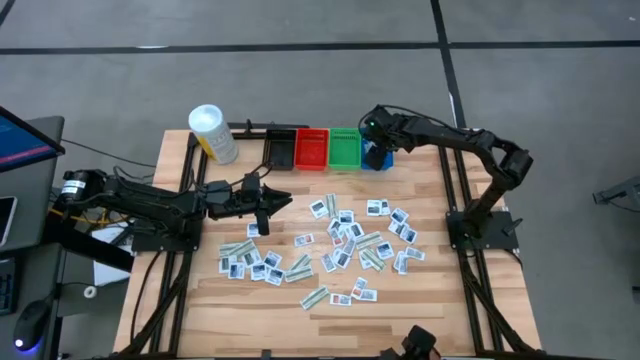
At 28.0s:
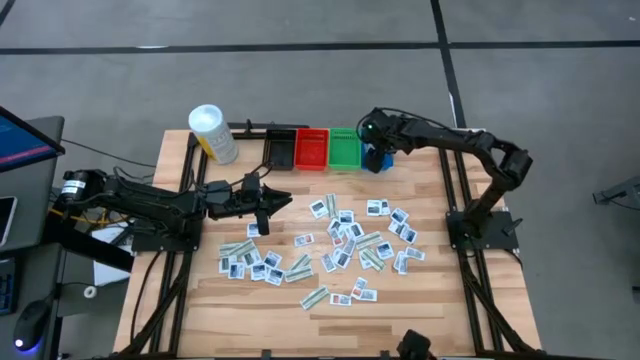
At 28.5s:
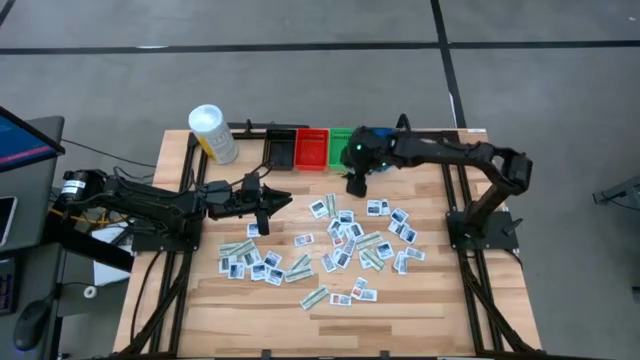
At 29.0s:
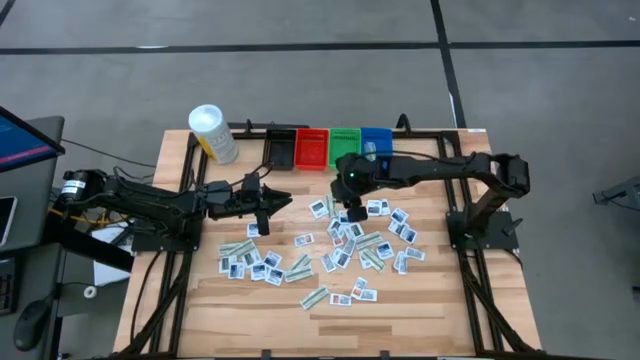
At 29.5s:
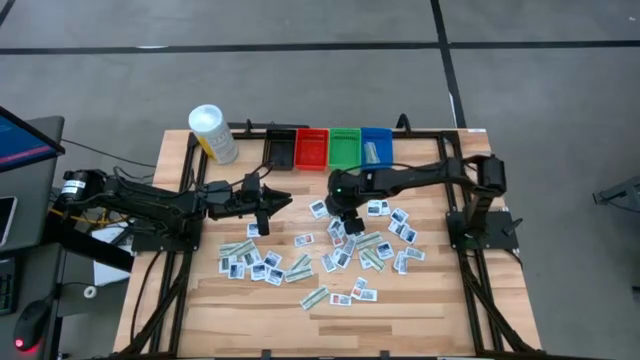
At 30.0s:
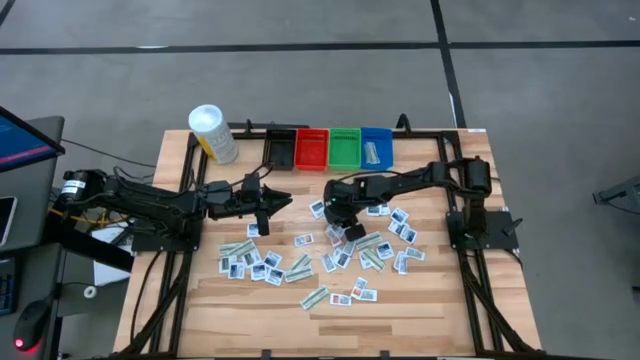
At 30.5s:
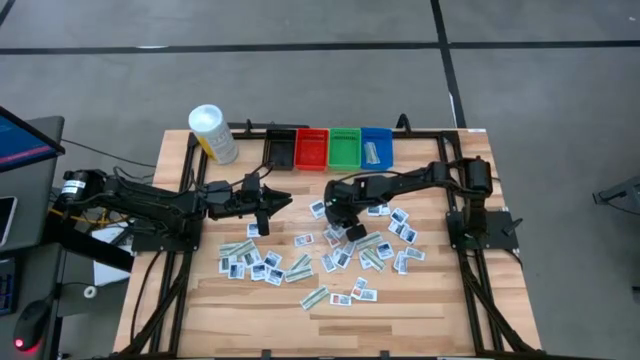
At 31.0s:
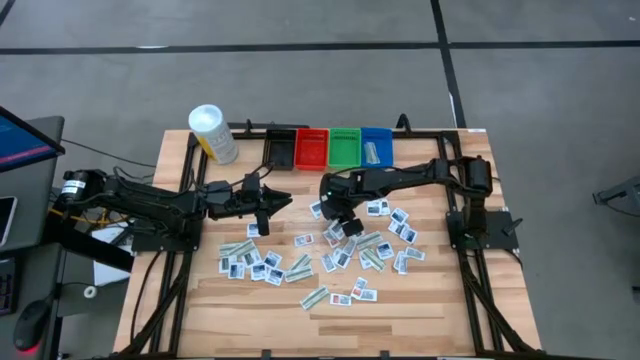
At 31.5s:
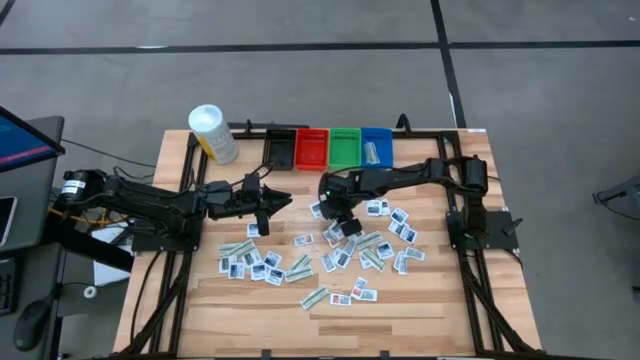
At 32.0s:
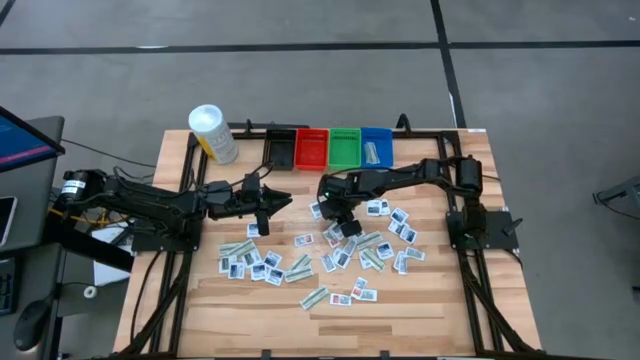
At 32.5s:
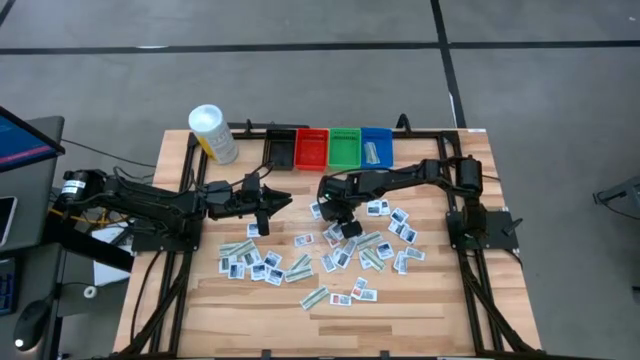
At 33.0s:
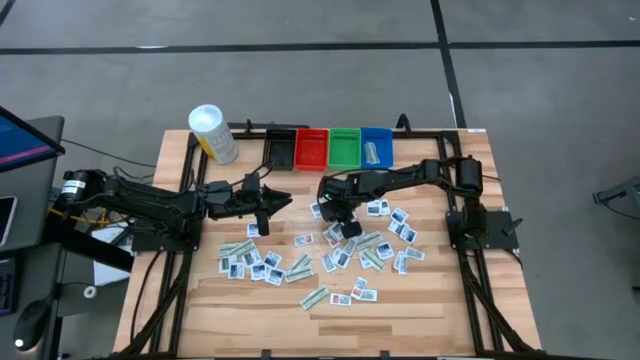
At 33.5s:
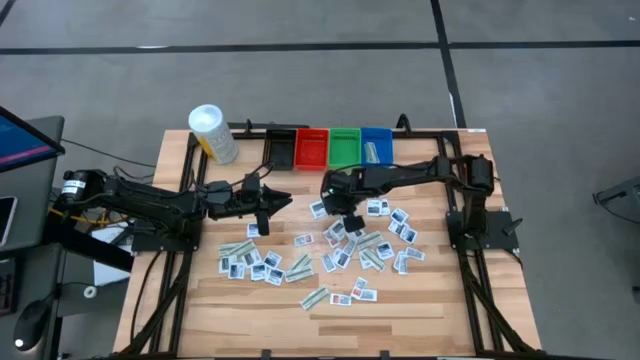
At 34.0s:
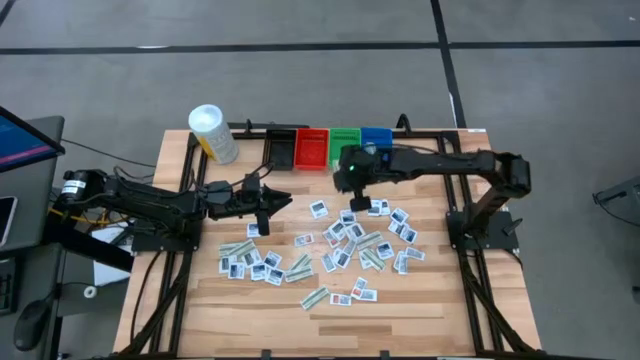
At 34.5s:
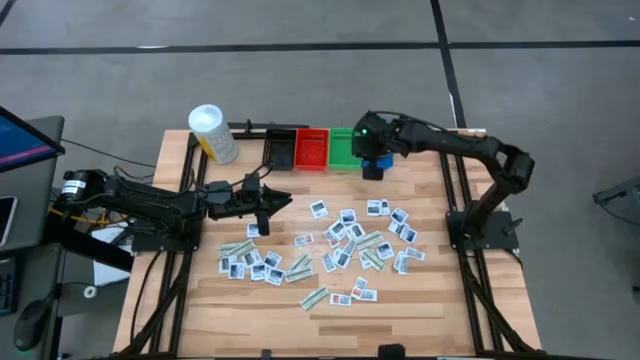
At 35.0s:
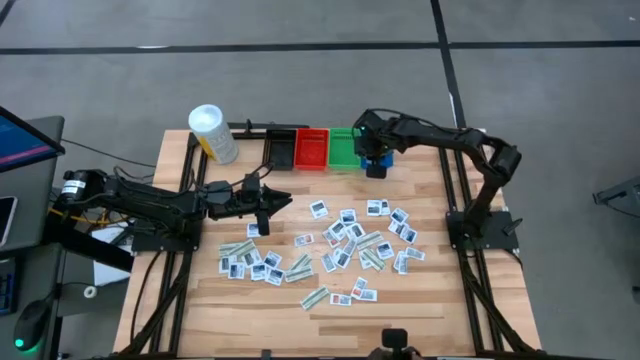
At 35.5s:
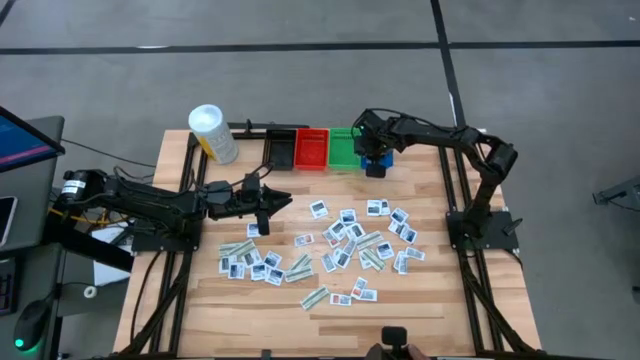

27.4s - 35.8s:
Task: Pick & Place First Aid Supplies
Put the bandage pack into the blue bin

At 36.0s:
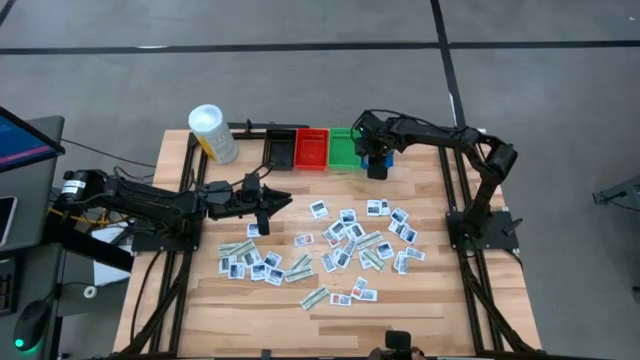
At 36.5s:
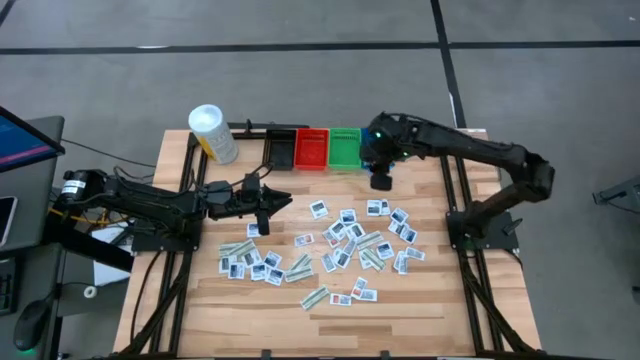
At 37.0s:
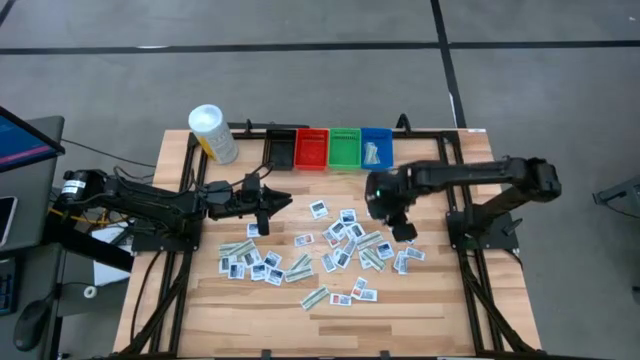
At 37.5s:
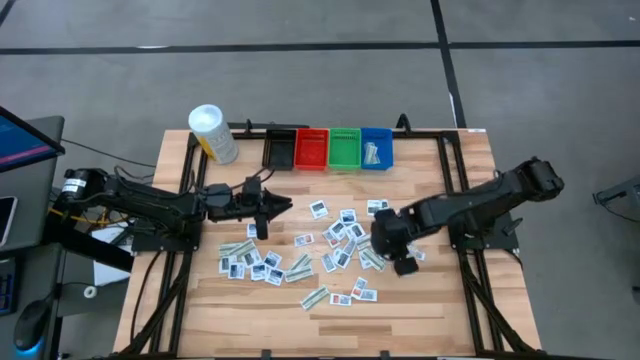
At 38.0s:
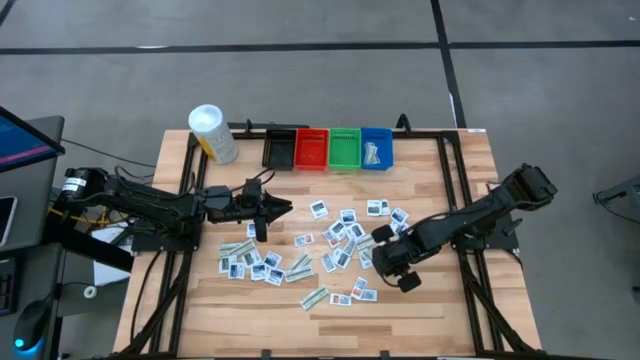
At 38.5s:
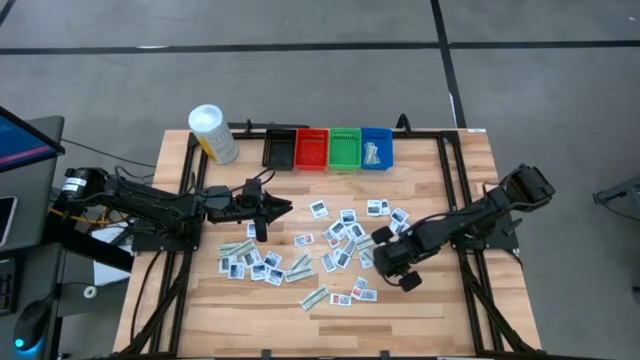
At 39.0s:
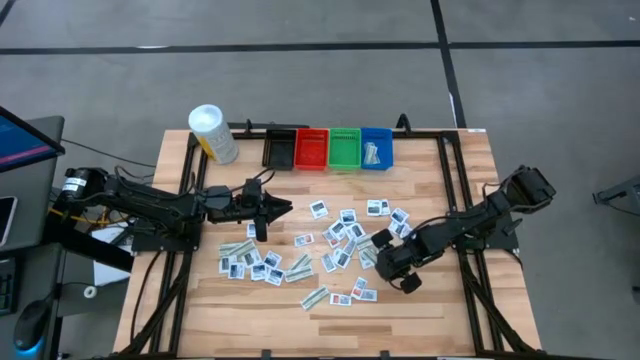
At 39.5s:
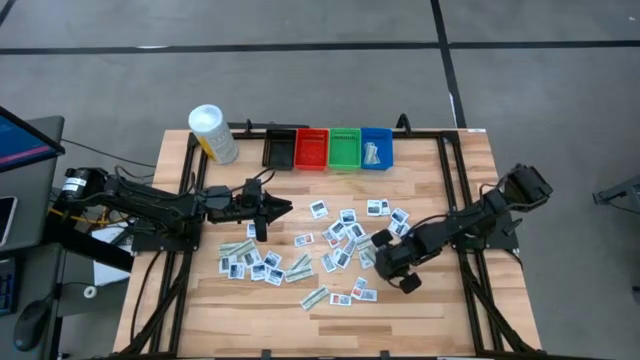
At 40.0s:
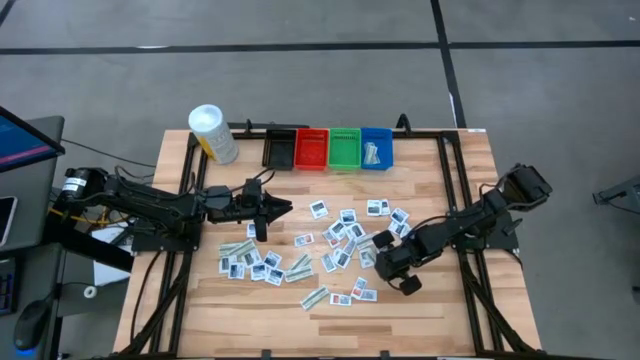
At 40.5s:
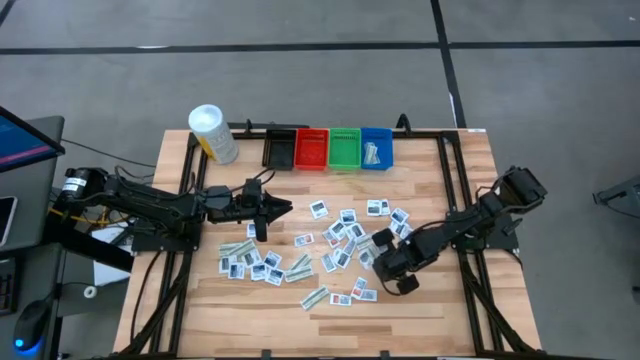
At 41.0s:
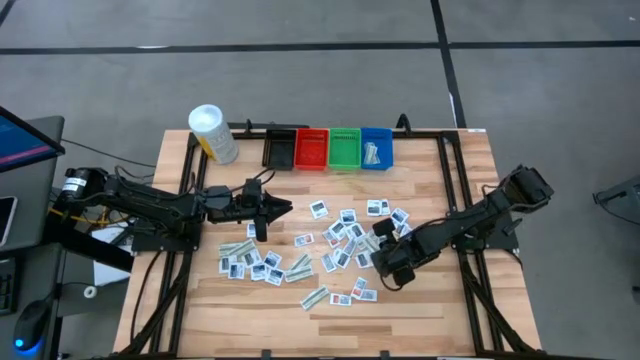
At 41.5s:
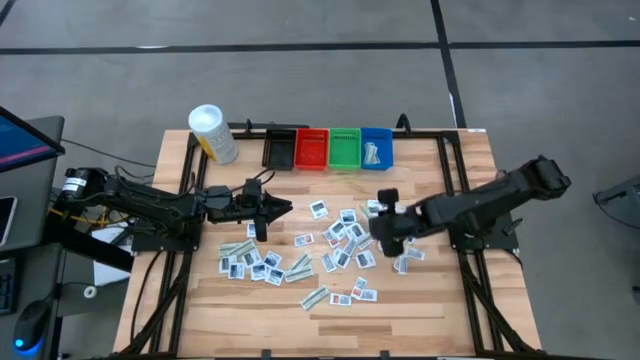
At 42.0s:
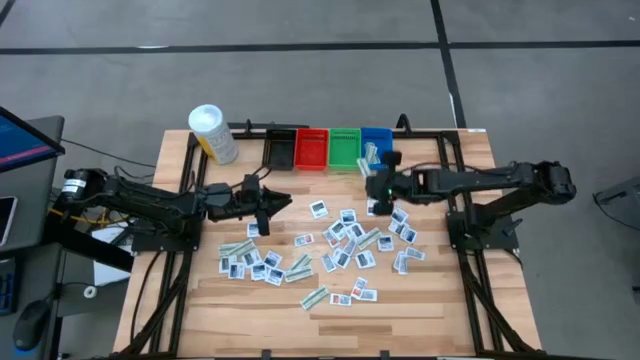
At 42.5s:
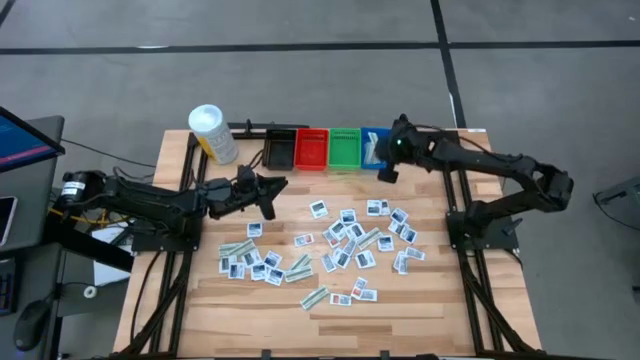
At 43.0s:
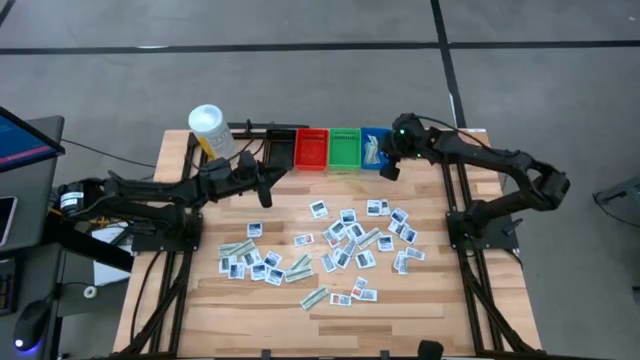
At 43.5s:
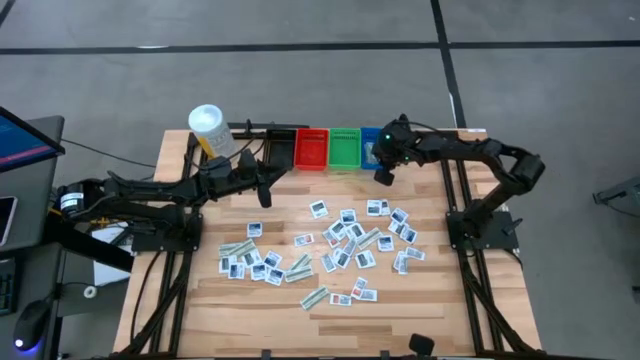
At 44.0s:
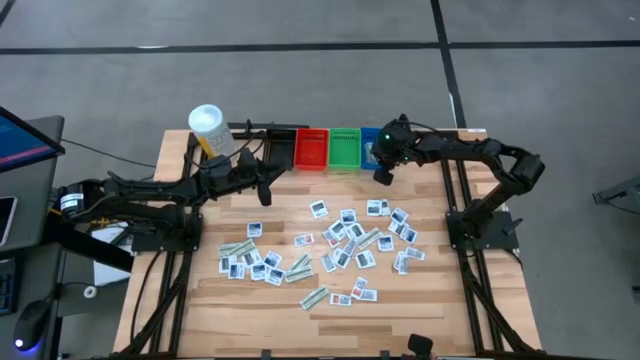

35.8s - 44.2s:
Put the bandage pack into the blue bin

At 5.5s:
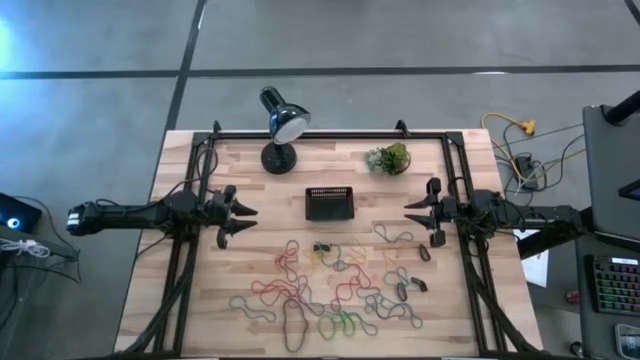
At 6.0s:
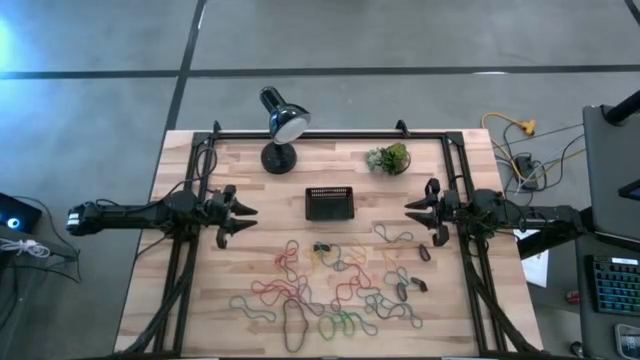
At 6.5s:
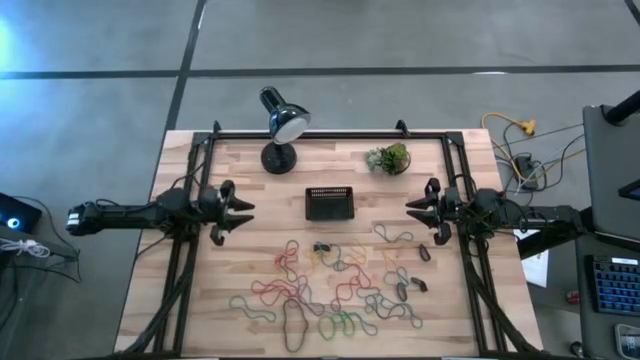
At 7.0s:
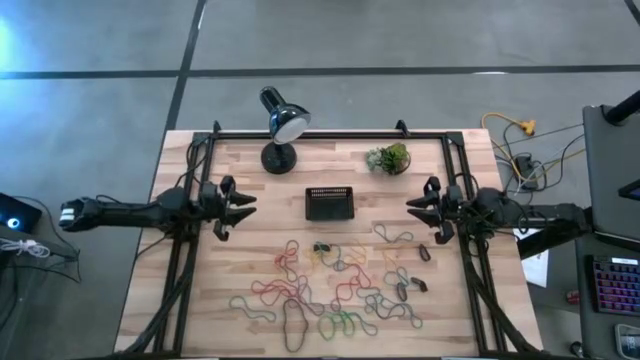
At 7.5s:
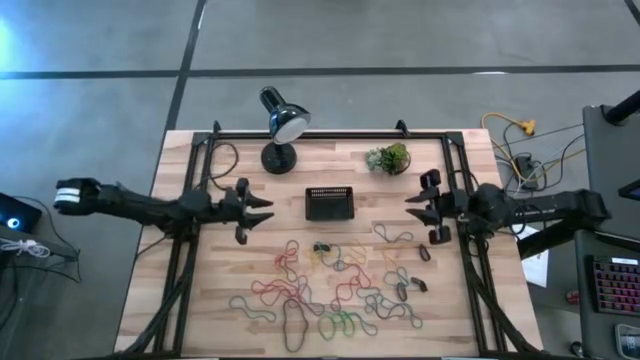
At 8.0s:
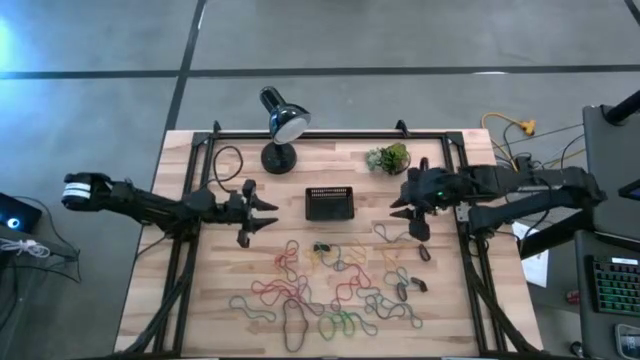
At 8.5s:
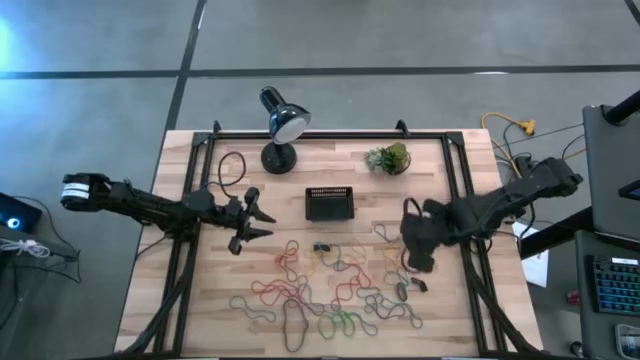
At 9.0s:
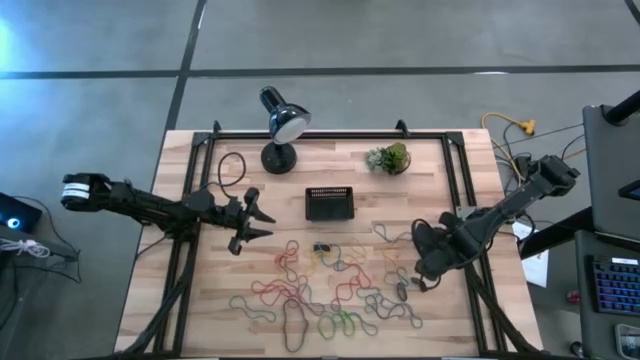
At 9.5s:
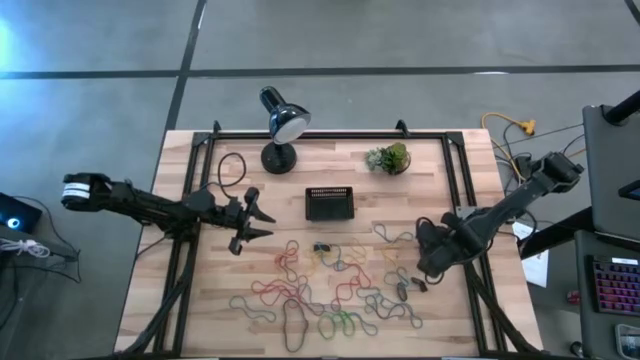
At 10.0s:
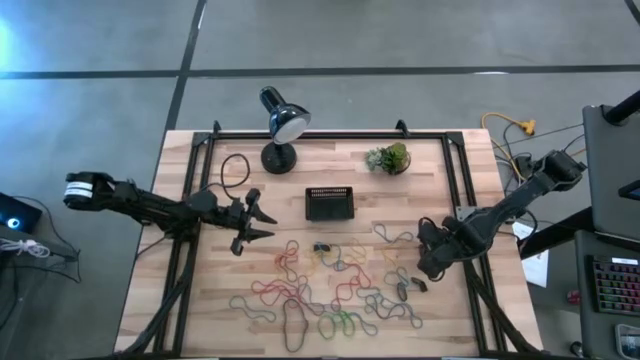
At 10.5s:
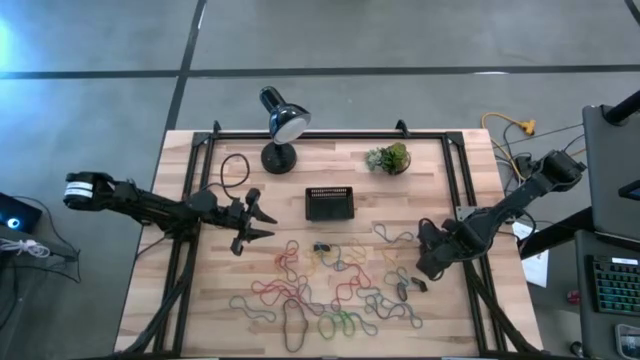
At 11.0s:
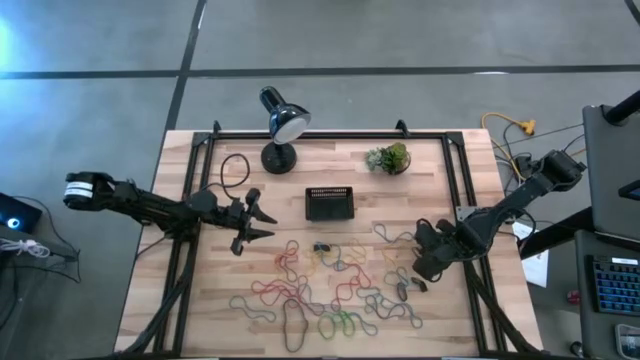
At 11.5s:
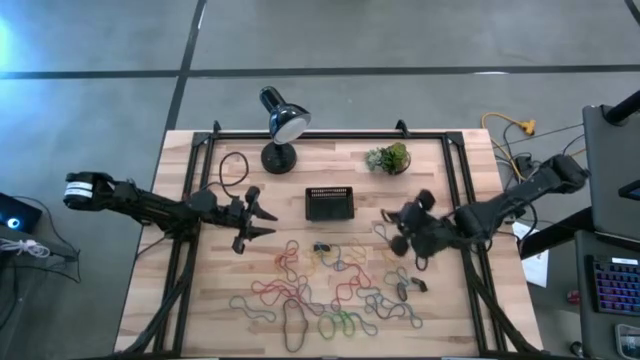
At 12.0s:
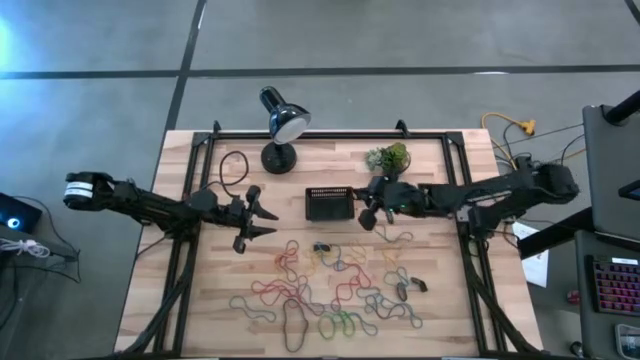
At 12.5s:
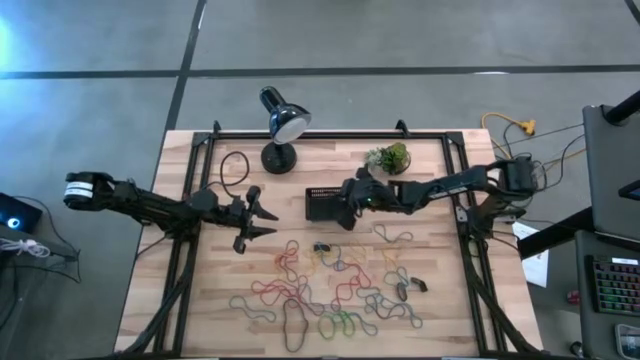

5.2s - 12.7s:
Task: Pick and place rubber bands into bin
Put the black rubber band into the black bin
